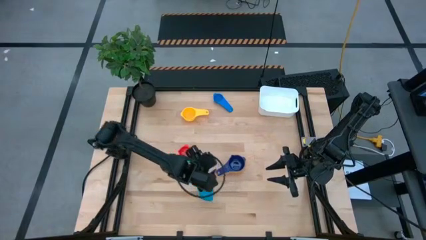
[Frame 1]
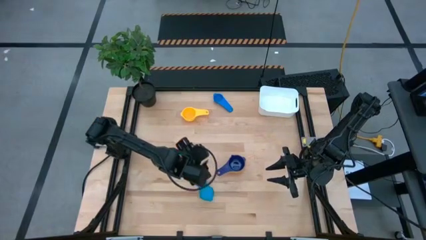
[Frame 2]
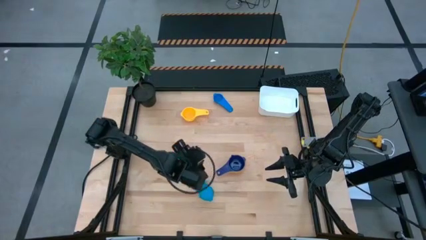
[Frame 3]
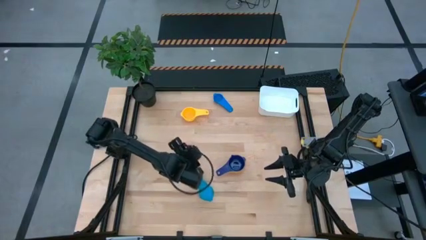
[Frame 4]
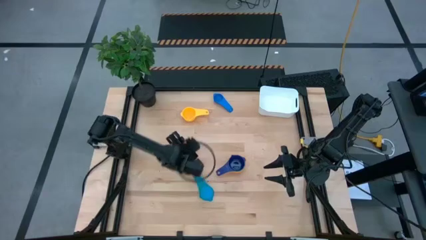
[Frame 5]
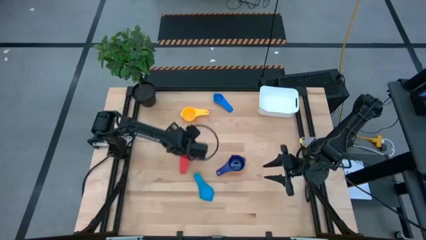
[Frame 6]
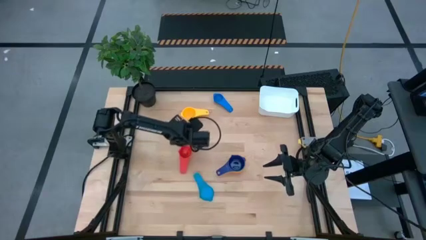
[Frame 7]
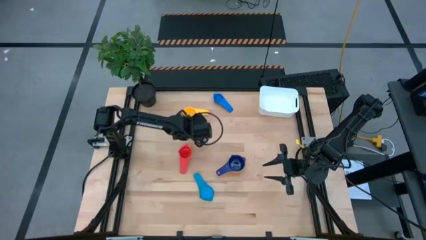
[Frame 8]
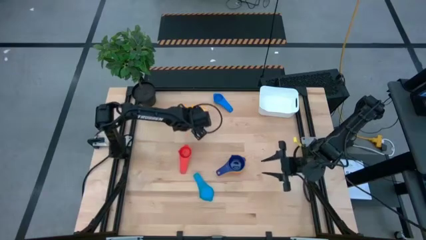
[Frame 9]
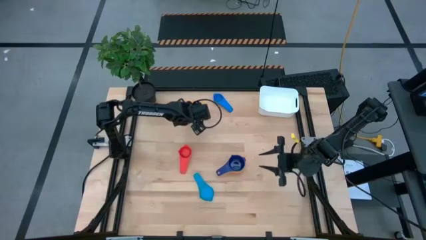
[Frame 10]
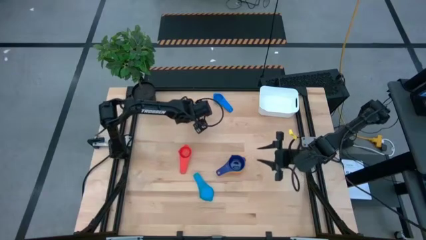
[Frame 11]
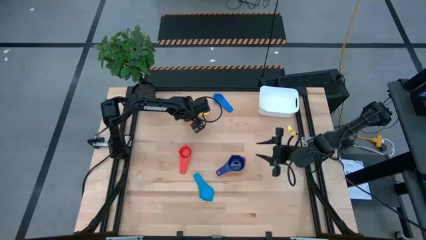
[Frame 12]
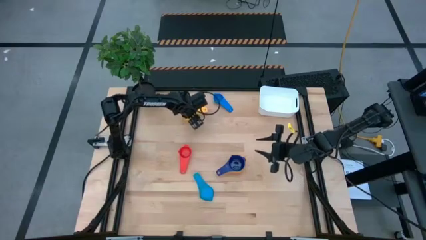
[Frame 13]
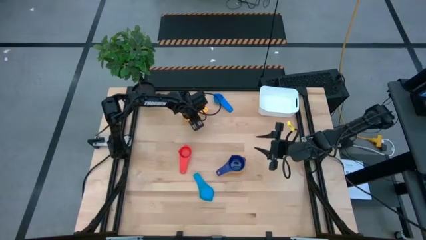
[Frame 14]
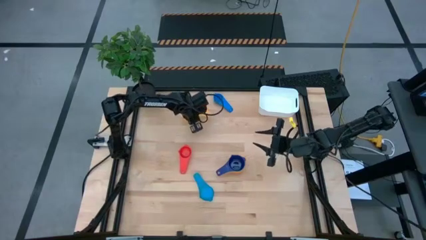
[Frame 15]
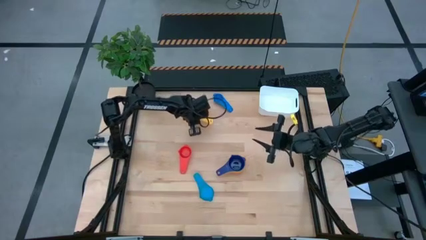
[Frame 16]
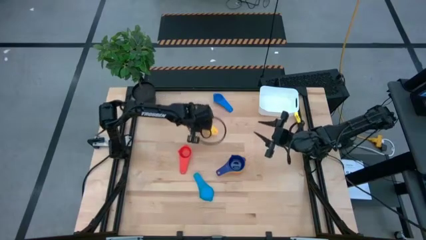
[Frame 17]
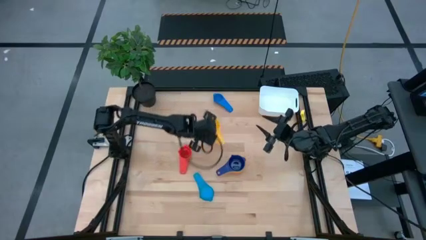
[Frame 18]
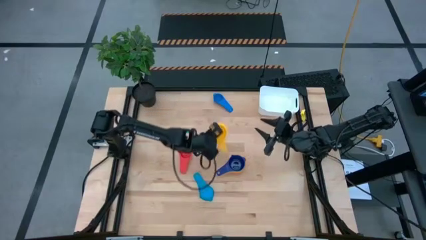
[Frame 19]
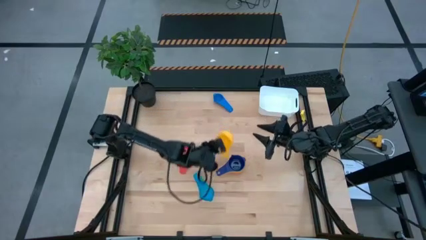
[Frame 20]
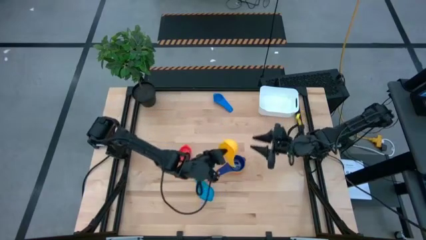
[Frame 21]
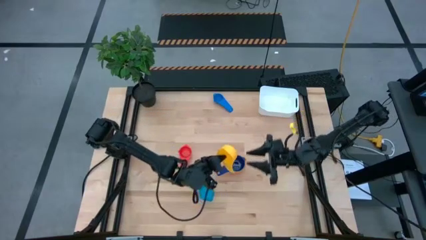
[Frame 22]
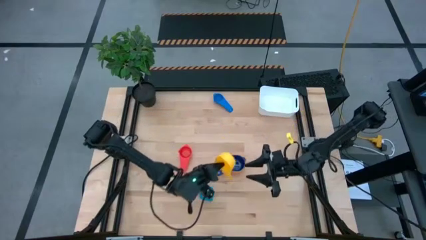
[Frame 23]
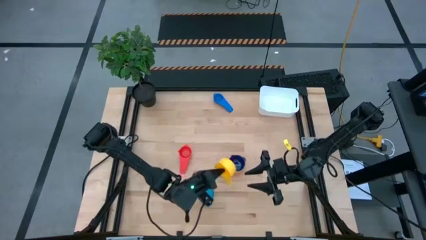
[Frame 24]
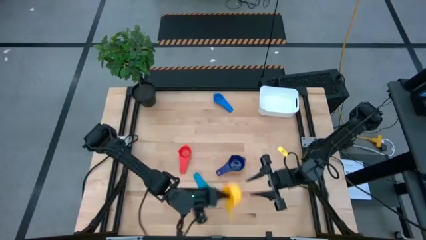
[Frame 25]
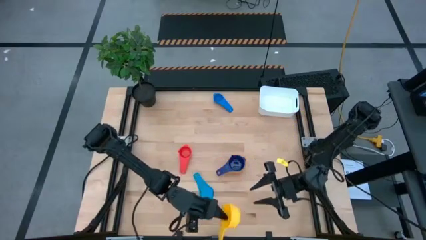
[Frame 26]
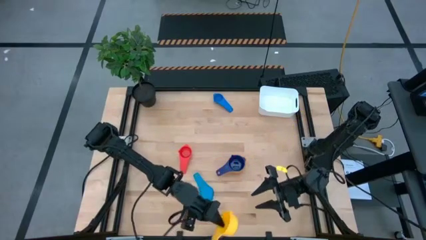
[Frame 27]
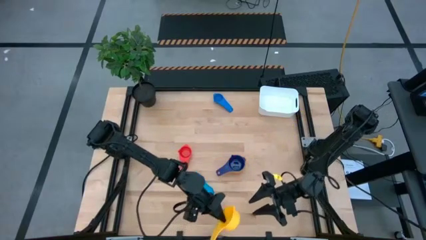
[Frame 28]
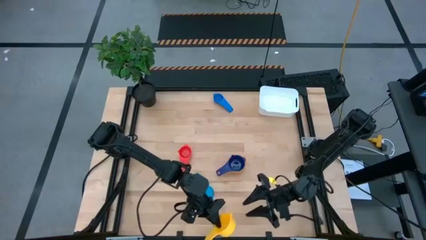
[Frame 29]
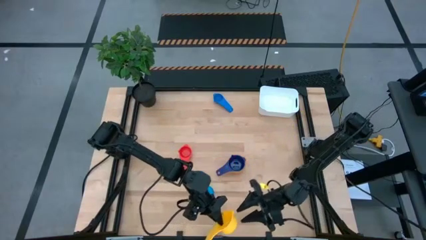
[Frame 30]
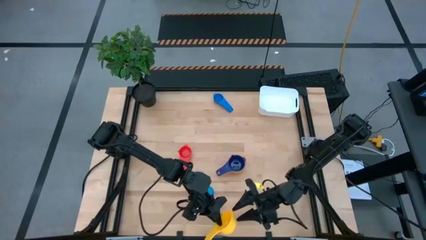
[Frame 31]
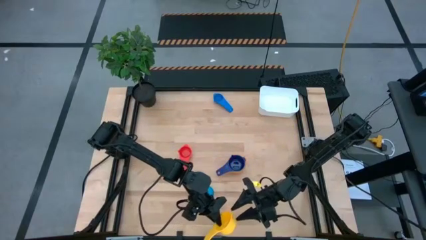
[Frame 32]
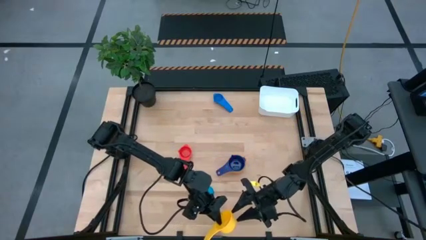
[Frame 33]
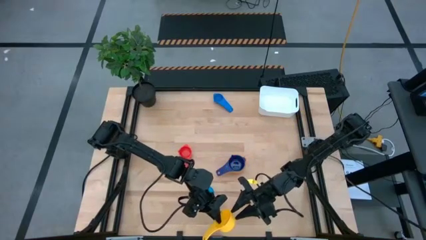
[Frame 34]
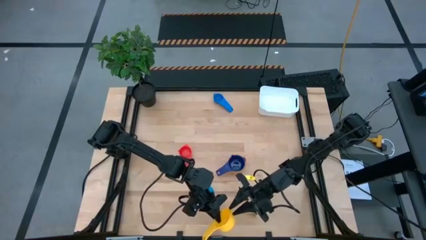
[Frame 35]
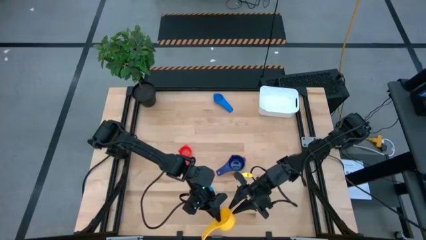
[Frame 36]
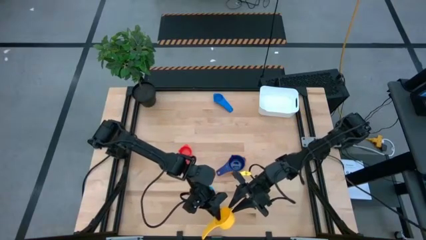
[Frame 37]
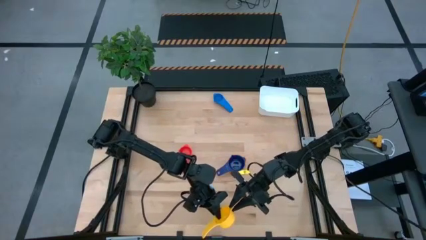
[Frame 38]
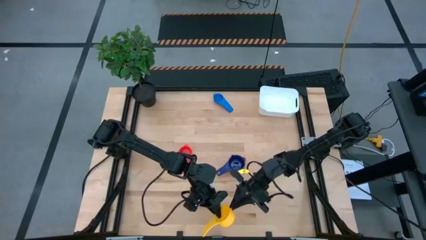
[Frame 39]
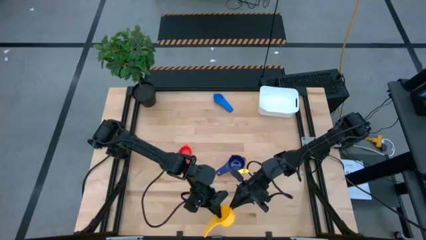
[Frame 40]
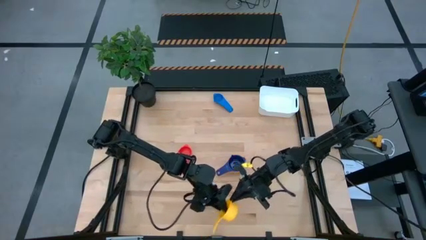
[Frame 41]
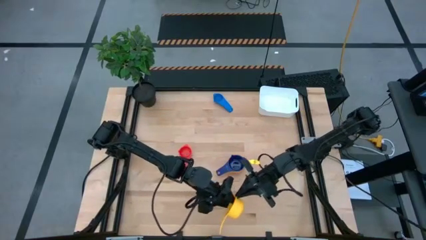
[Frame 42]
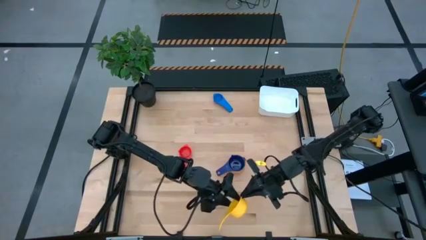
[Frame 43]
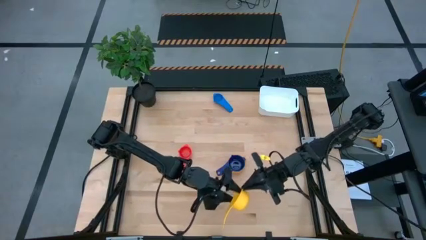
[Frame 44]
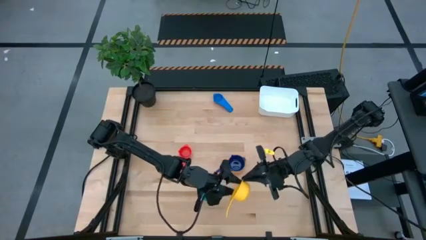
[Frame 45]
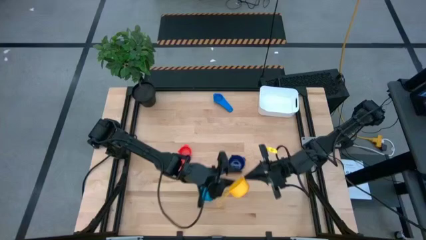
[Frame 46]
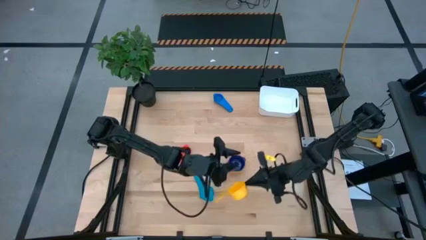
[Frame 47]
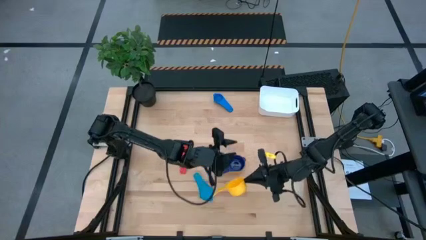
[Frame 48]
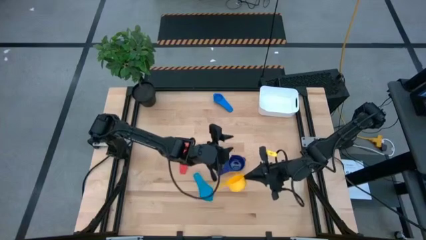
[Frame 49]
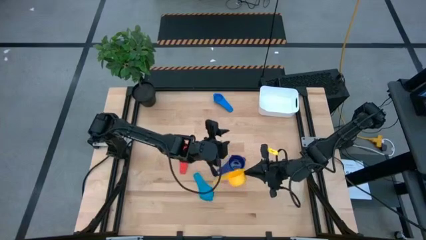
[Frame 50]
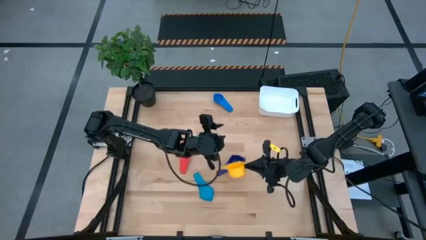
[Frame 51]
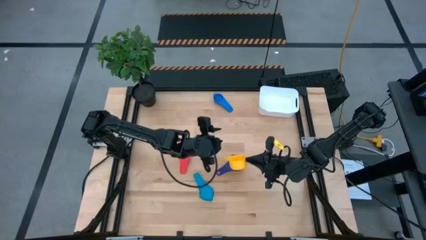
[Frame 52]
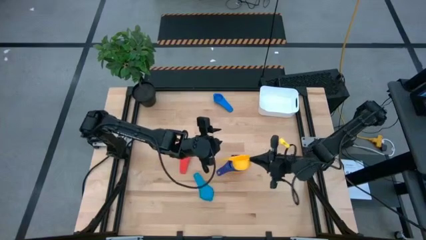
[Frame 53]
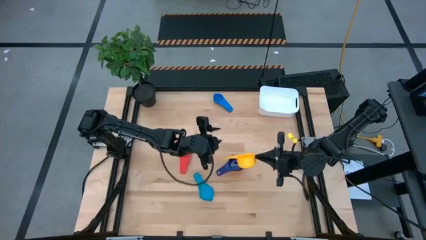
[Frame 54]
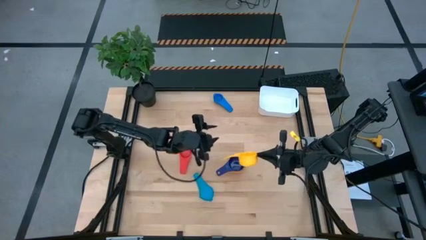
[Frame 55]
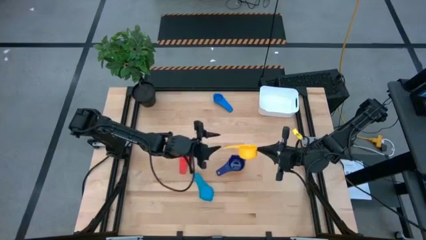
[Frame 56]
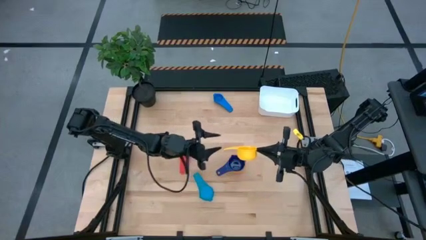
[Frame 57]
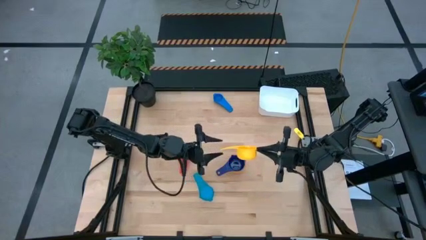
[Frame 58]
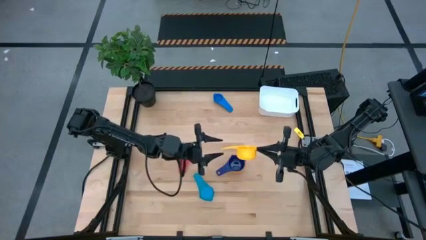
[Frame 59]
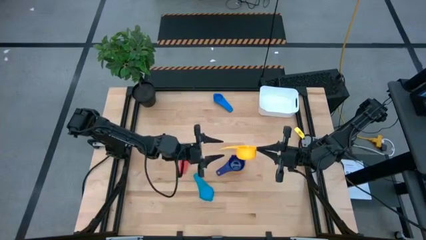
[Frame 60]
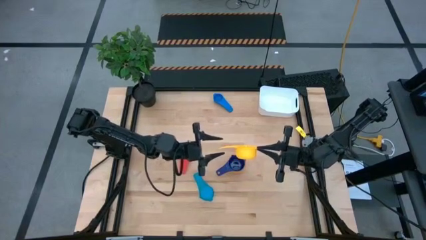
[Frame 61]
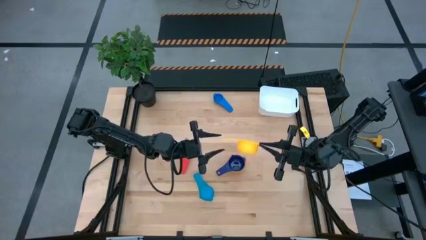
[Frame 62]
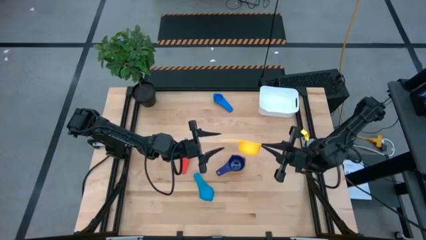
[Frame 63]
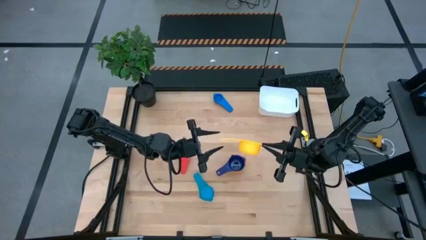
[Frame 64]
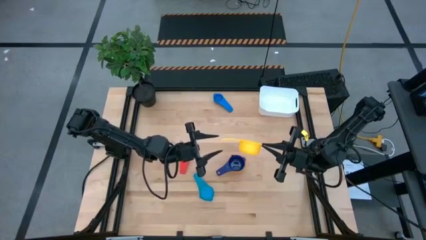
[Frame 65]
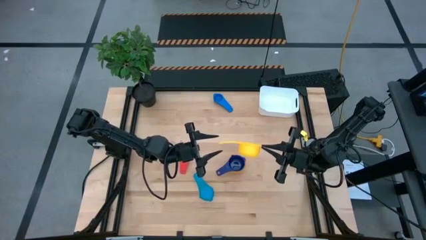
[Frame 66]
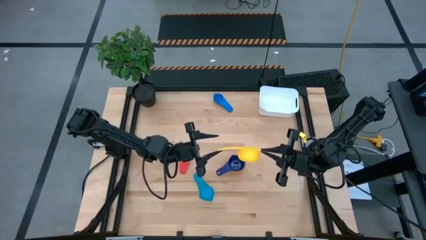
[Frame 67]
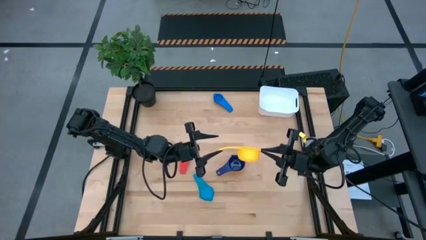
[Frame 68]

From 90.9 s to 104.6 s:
Task: Nest measuring cups in basket
Stack the yellow measuring cup on top of the violet measuring cup

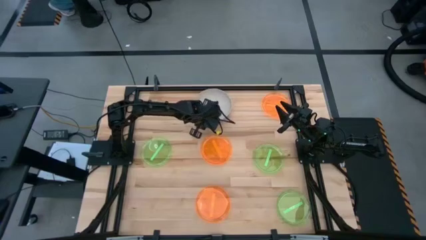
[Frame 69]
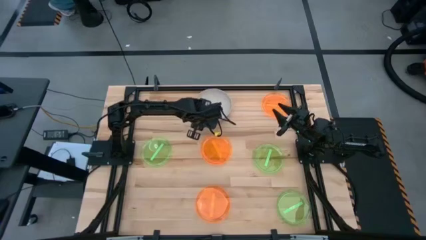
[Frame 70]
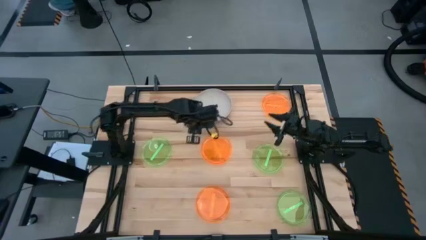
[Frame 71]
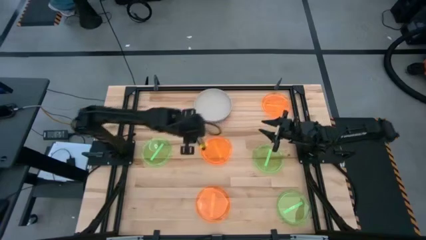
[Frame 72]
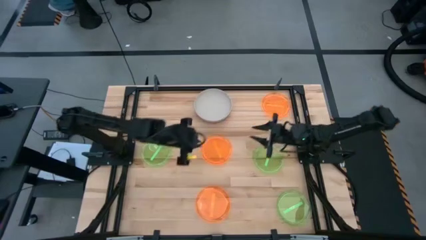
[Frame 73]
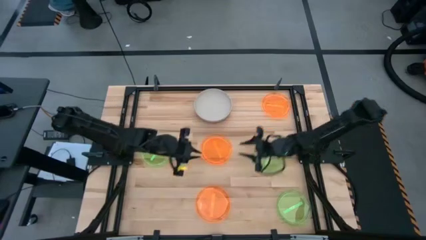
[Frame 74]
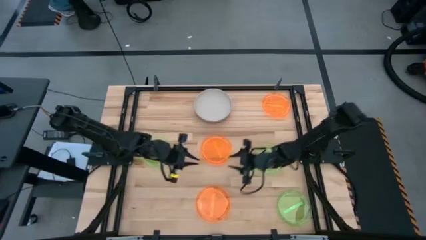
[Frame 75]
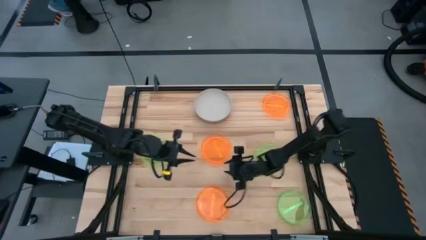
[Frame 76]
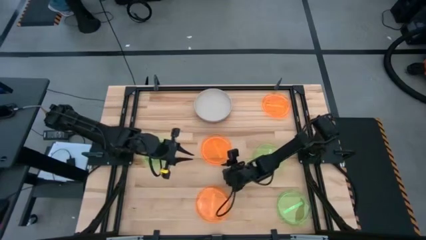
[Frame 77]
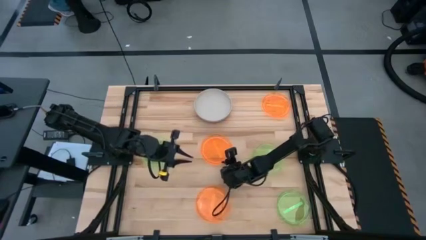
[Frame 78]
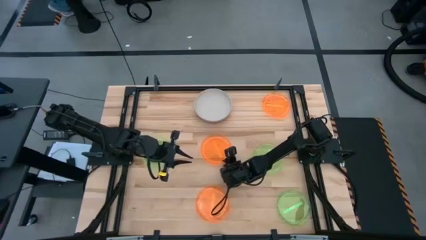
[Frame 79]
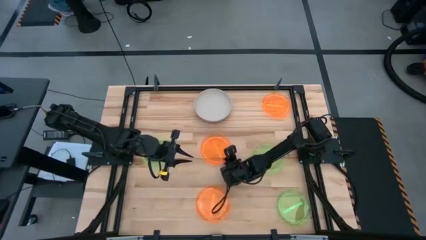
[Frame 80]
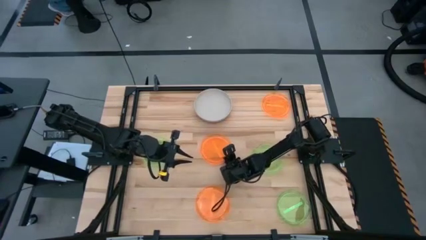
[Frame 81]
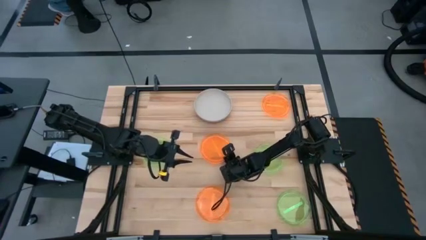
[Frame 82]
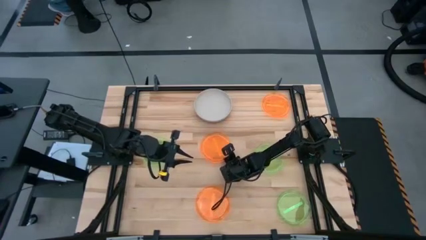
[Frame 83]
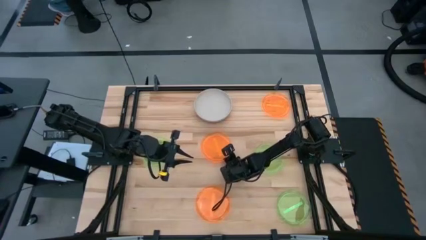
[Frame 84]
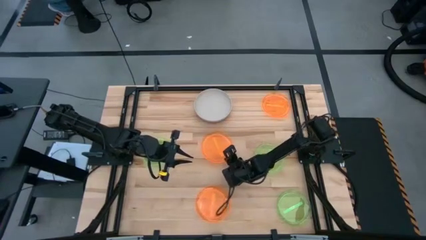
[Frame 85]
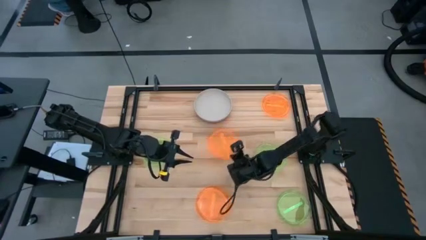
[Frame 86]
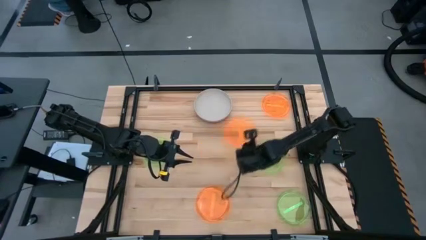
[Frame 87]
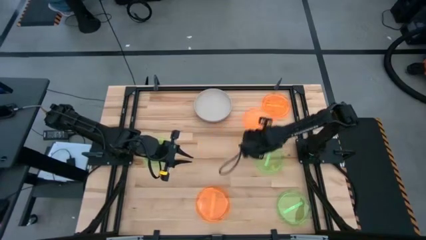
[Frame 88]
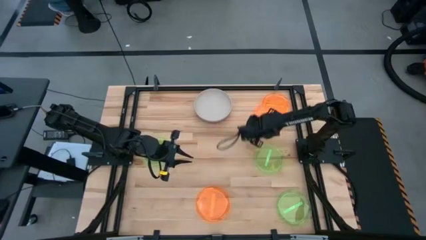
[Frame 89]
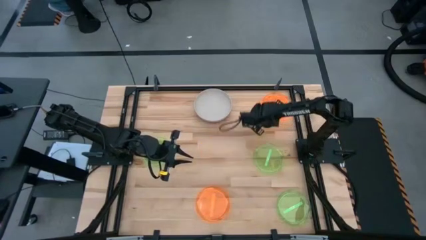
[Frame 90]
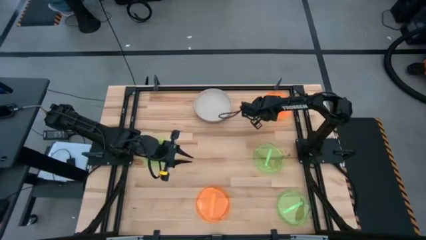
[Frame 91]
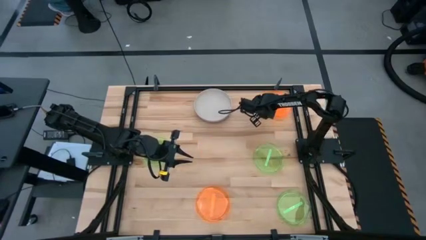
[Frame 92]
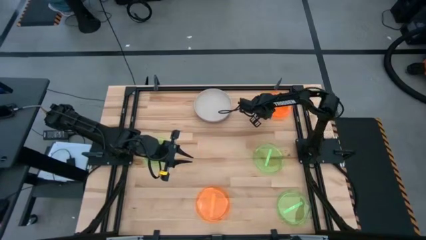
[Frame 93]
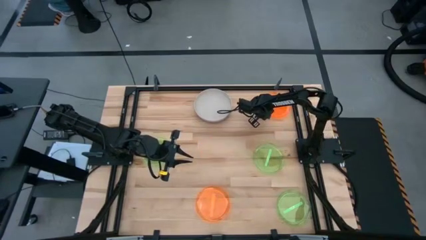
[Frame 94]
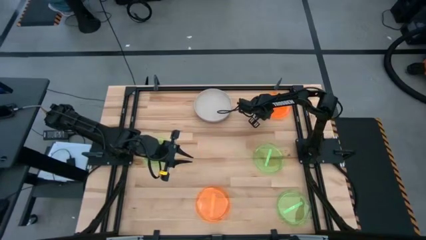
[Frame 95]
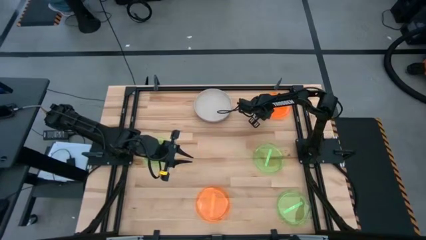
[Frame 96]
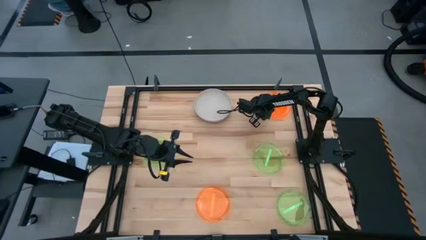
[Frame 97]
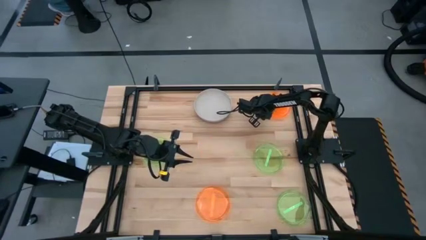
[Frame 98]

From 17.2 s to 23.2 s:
Task: Stack plastic plates
Stack the middle orange plate on top of the top orange plate
